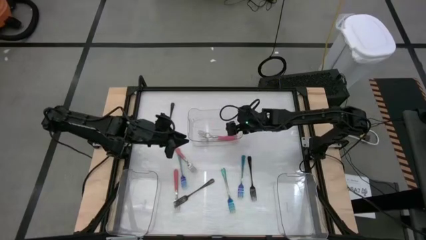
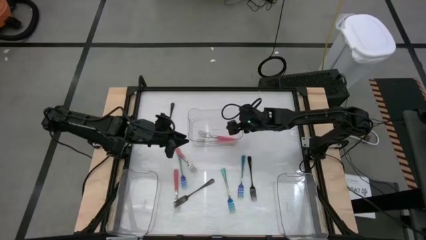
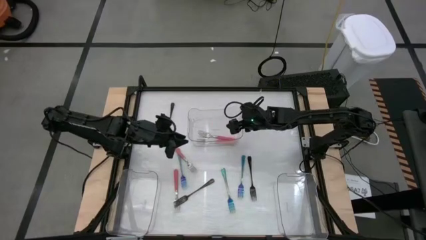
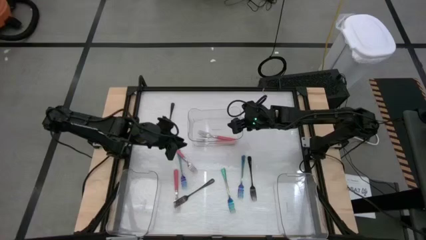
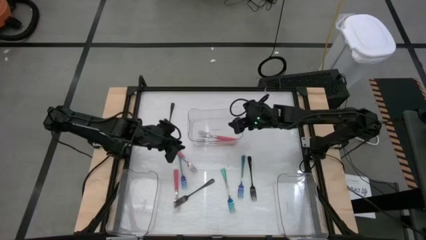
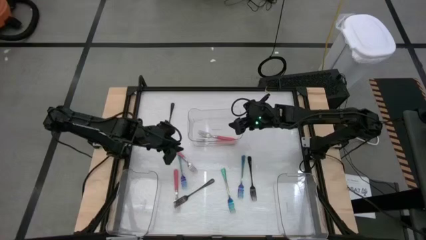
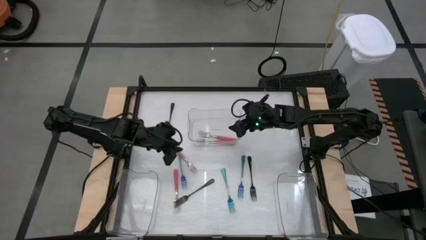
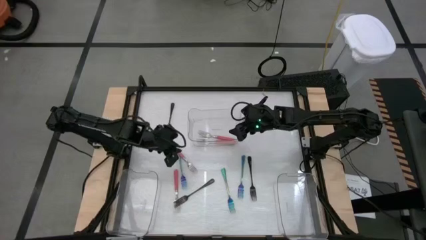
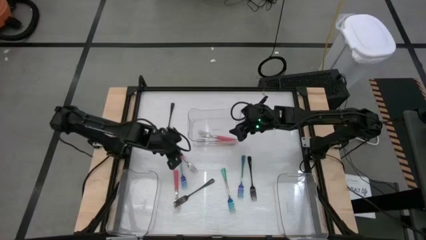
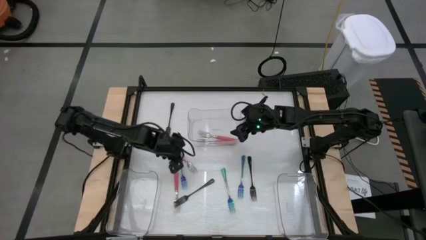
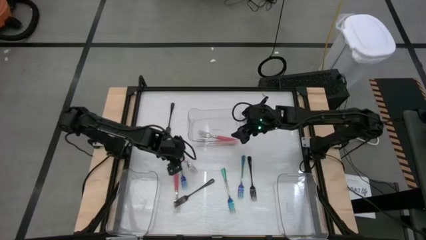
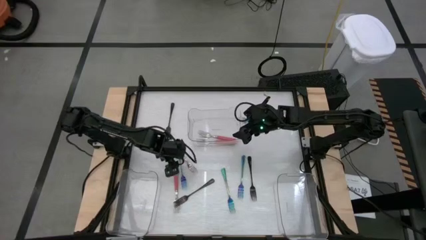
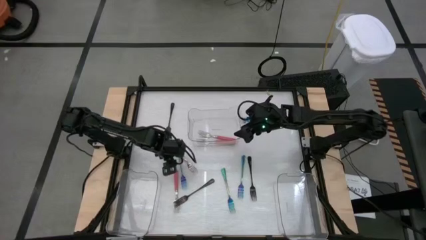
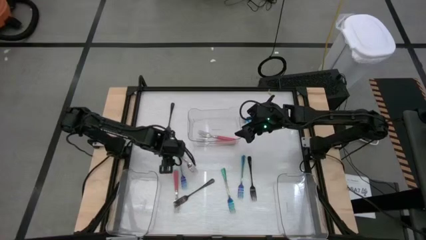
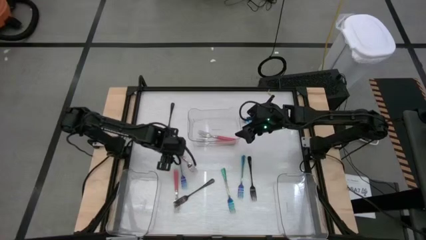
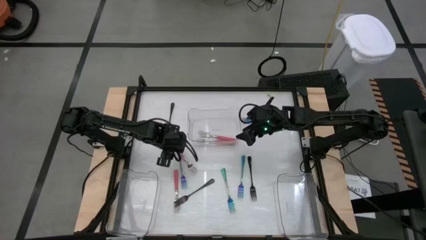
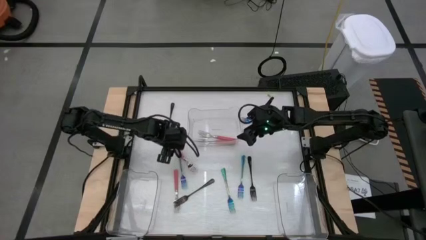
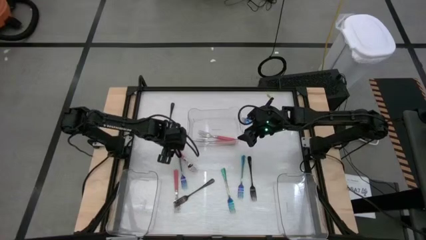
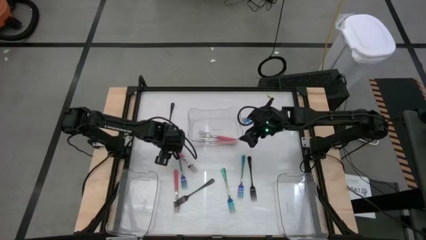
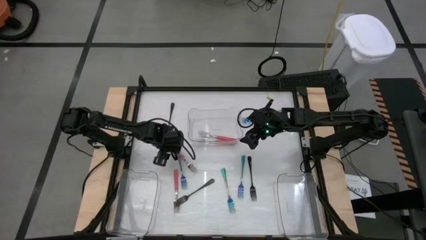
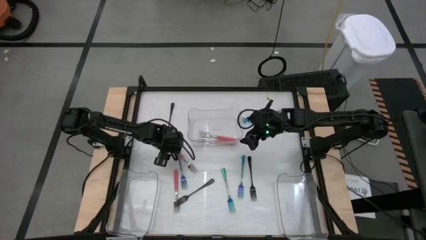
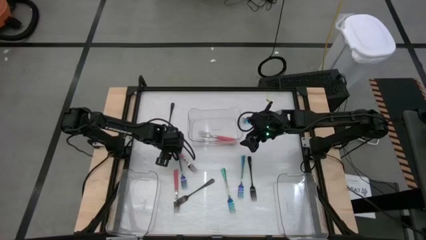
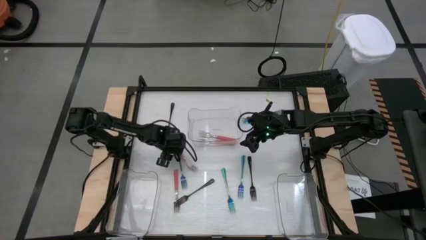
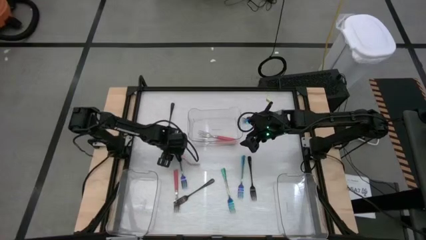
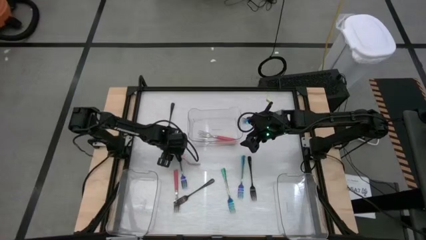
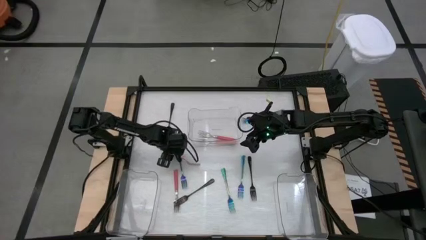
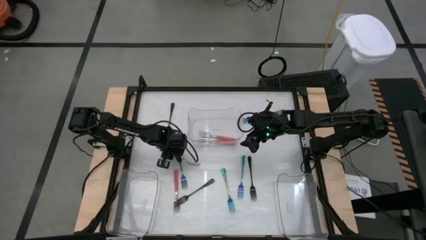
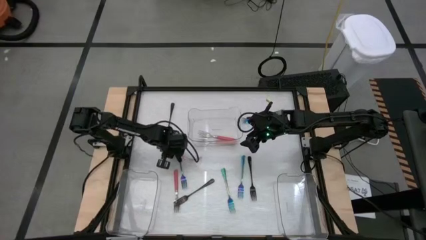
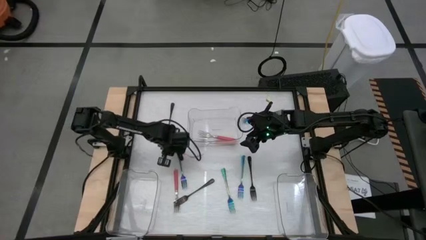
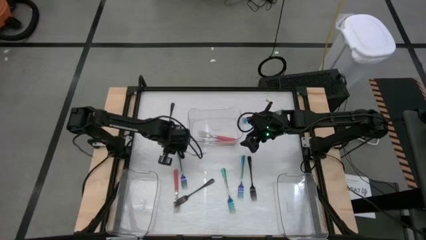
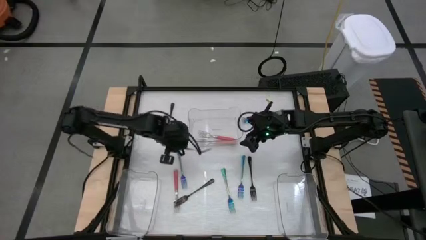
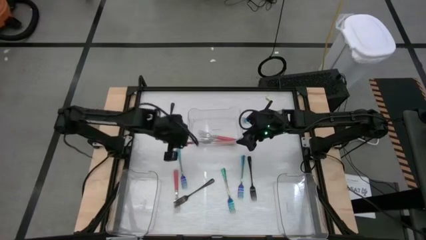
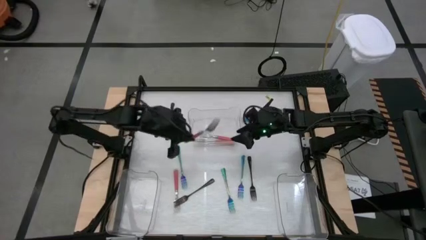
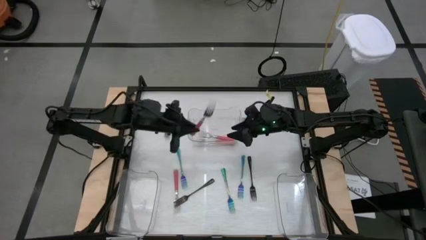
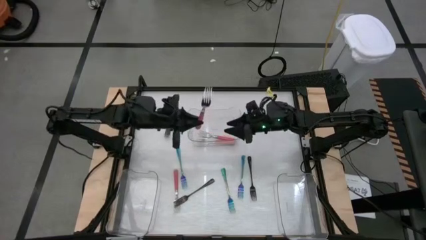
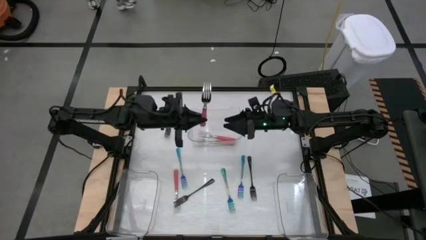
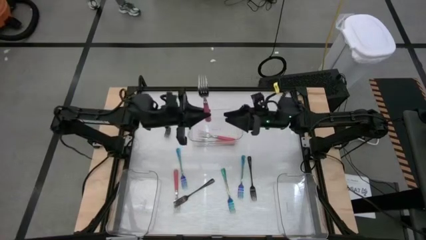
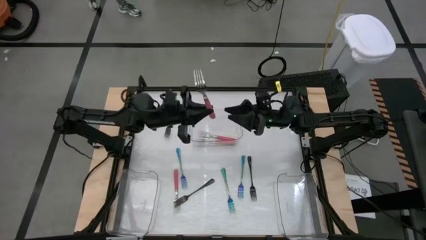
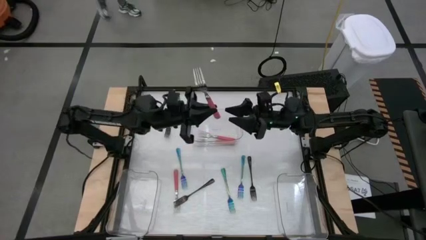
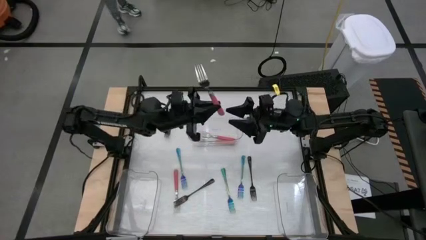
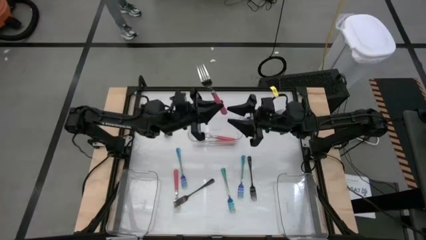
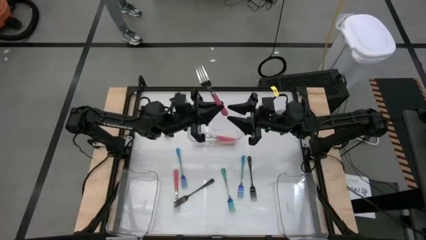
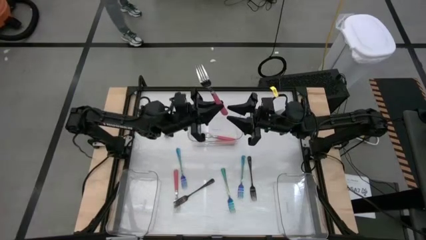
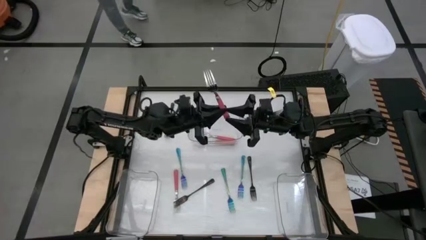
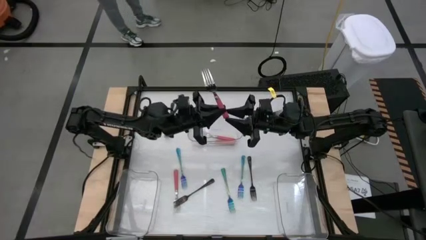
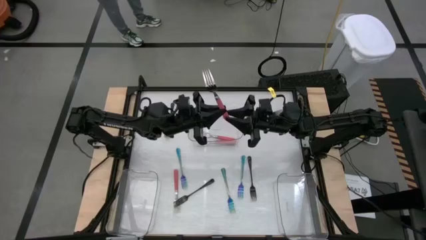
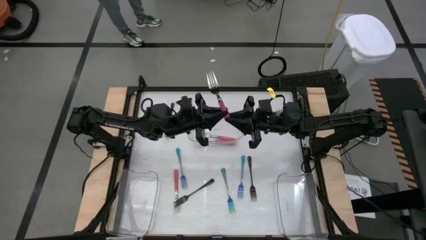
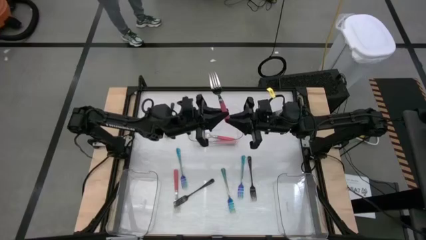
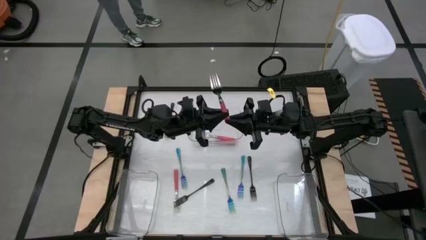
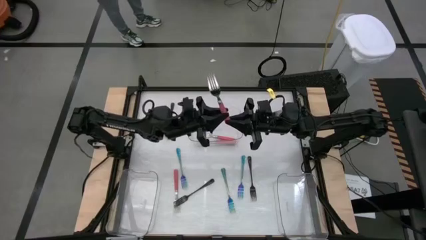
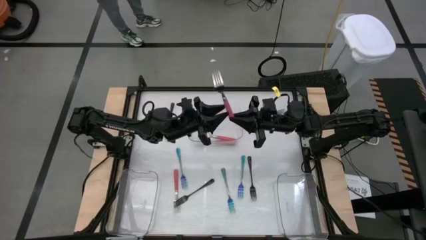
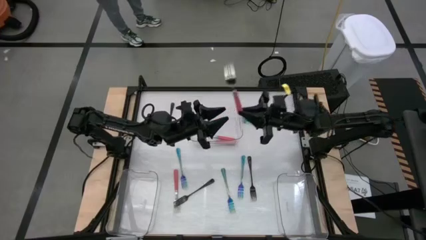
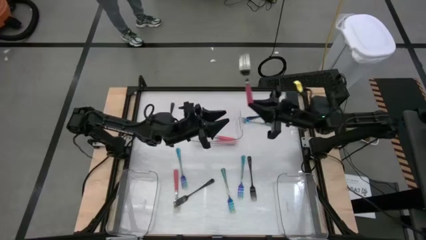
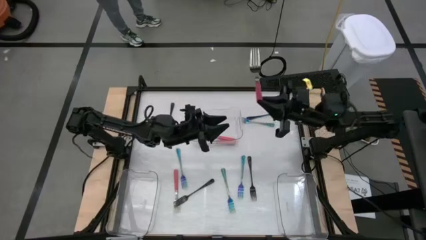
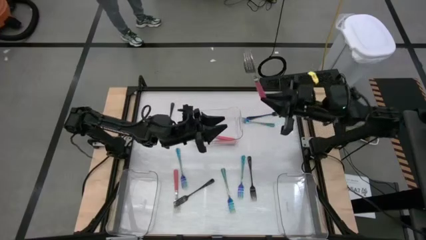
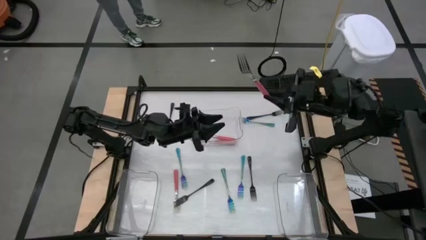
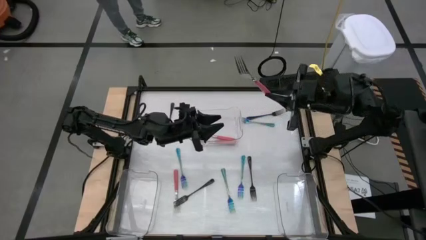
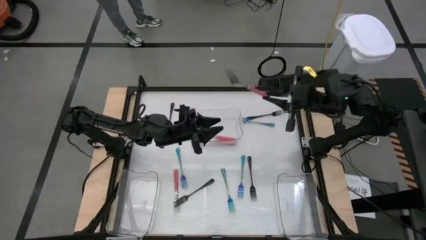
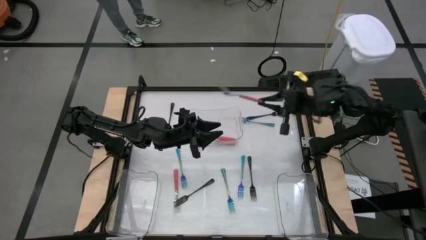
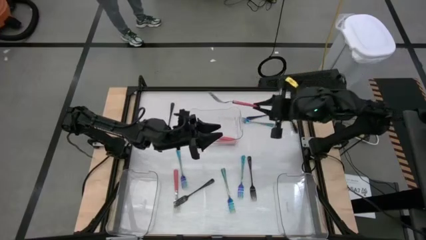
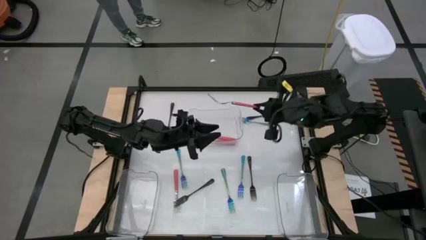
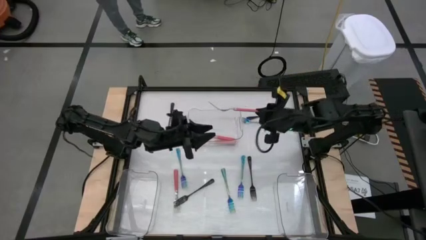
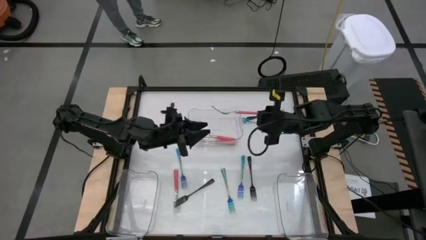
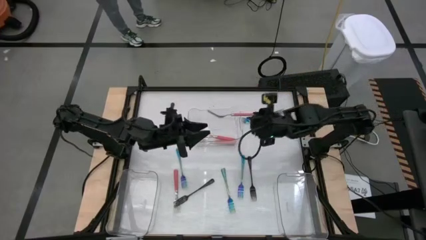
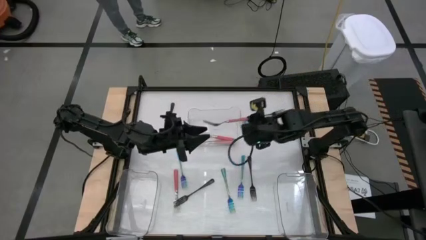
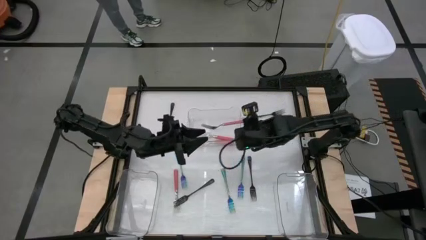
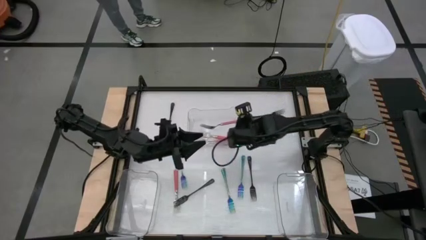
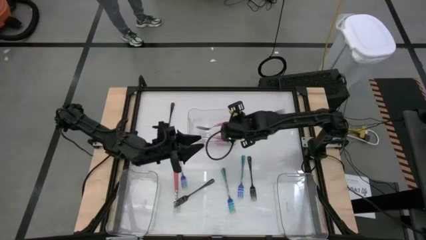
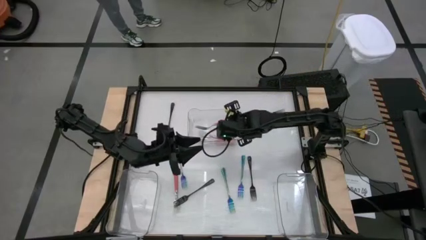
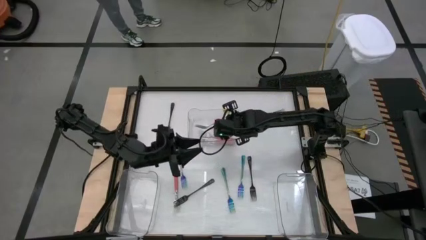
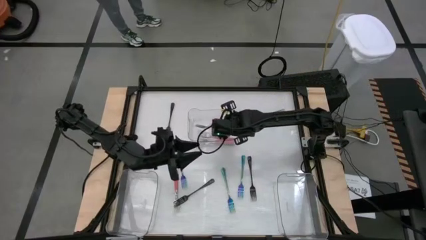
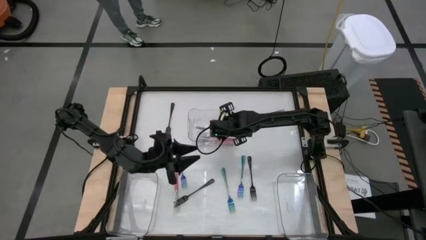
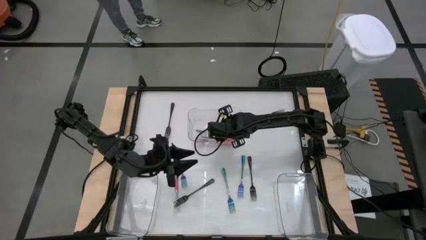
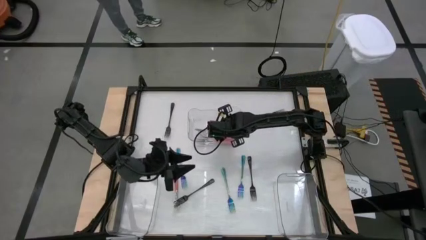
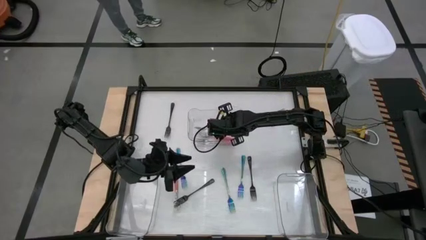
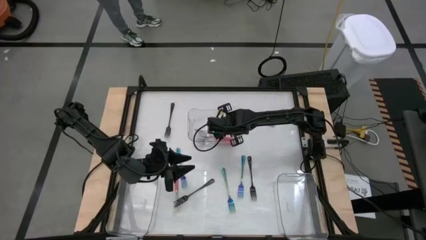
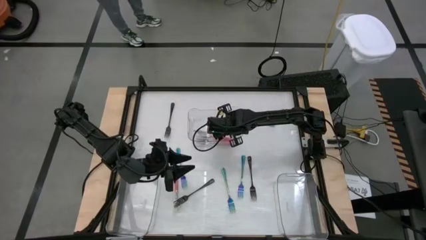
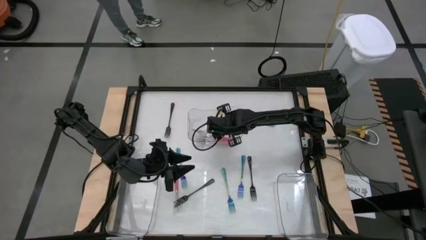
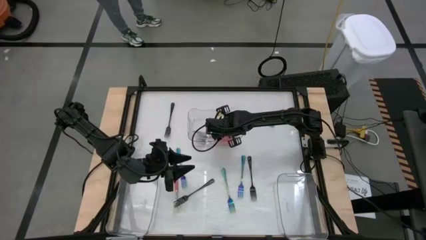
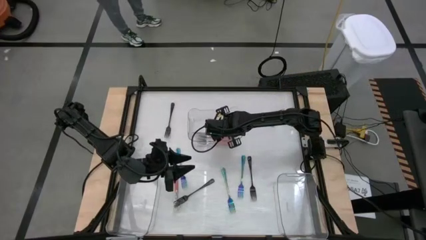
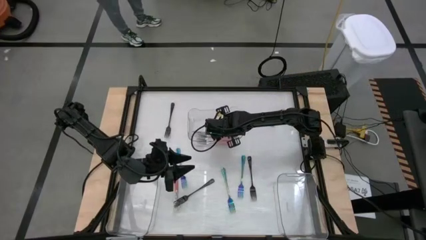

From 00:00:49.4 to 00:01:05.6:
Task: Sort silverware by color (type)
Put the pink fork into the middle transparent bin
